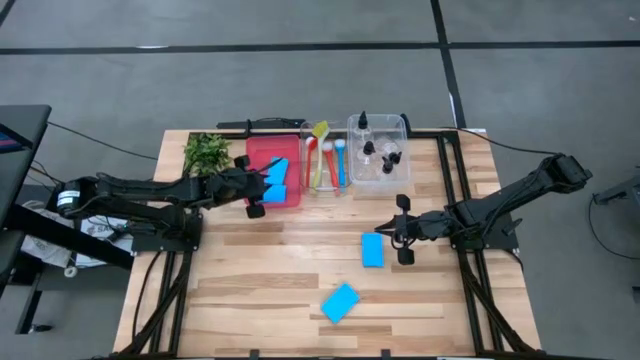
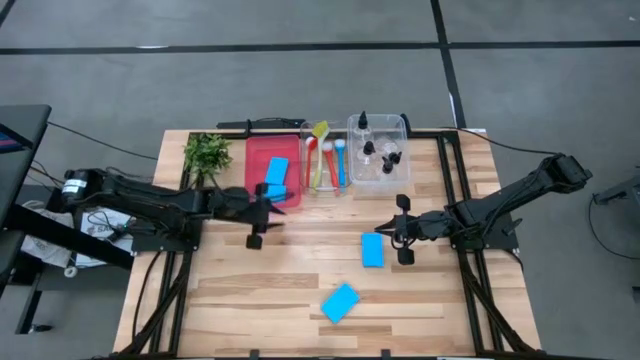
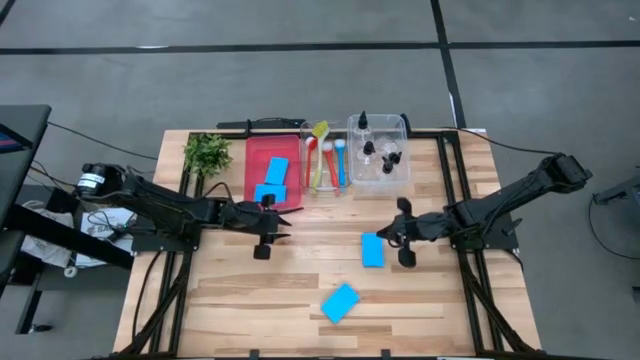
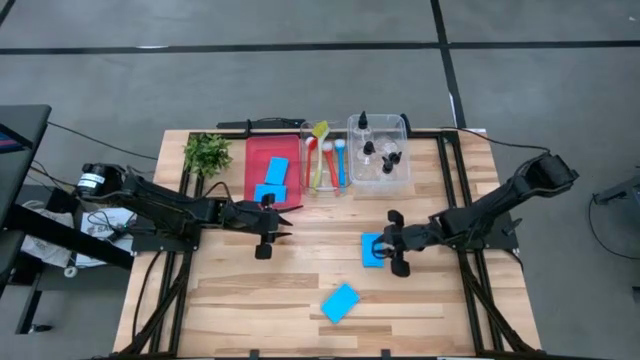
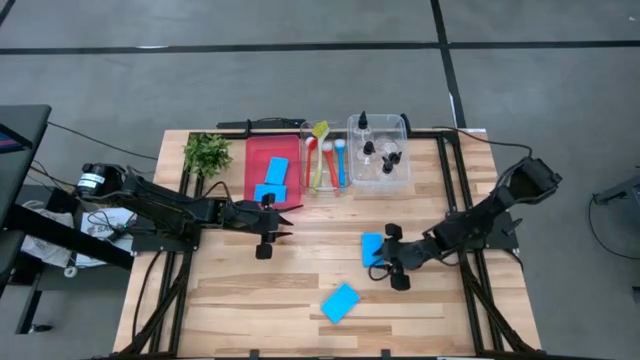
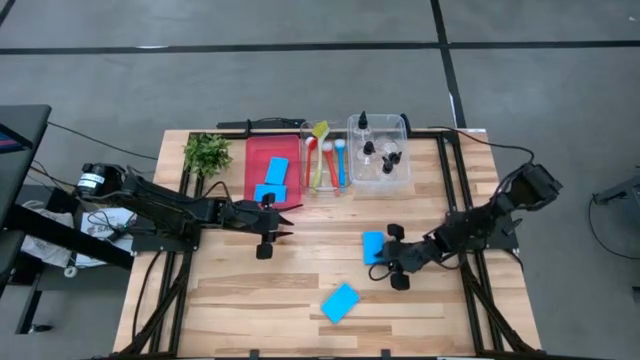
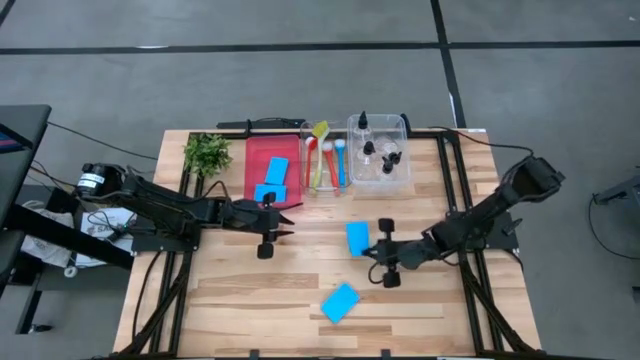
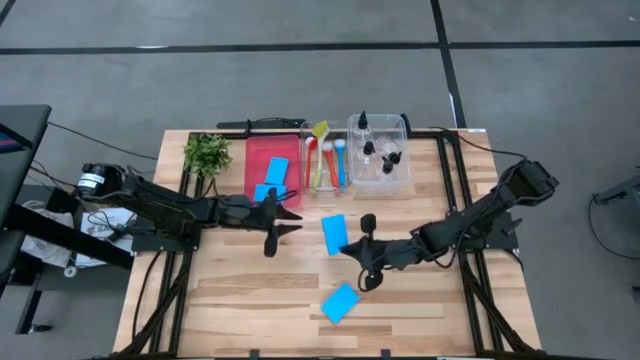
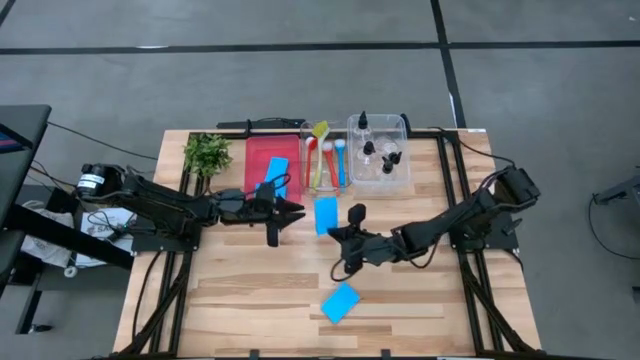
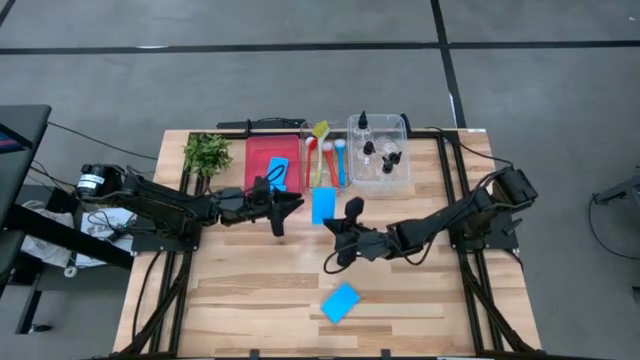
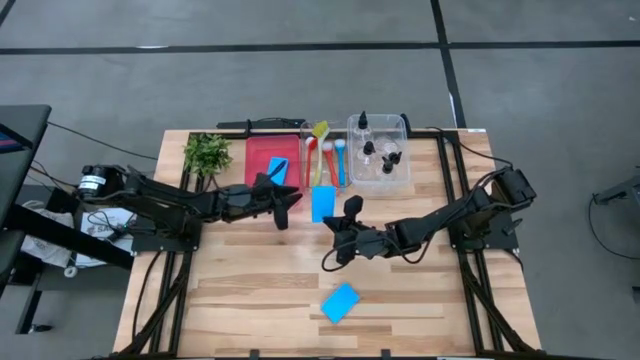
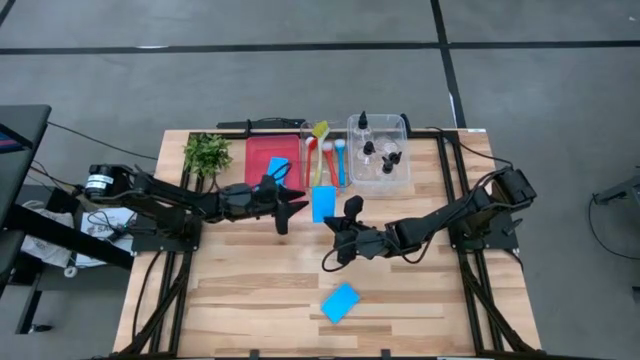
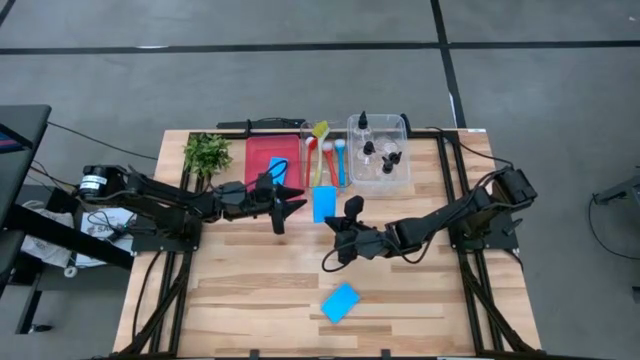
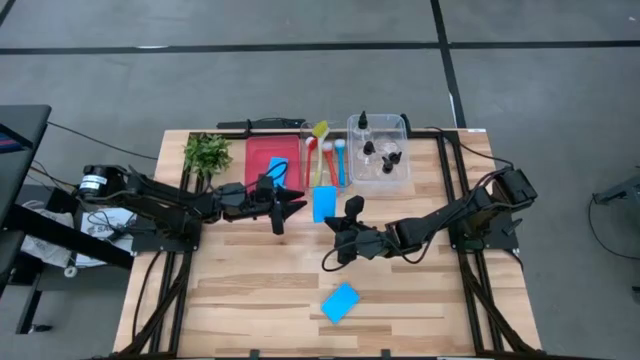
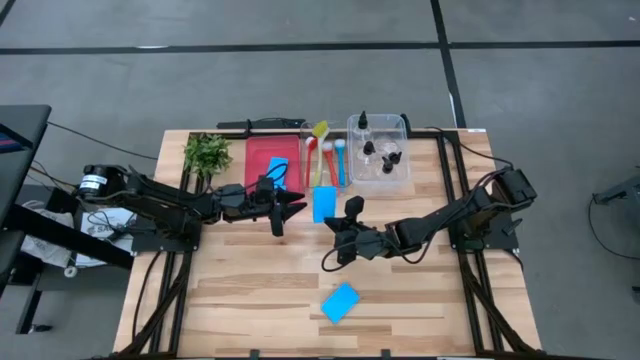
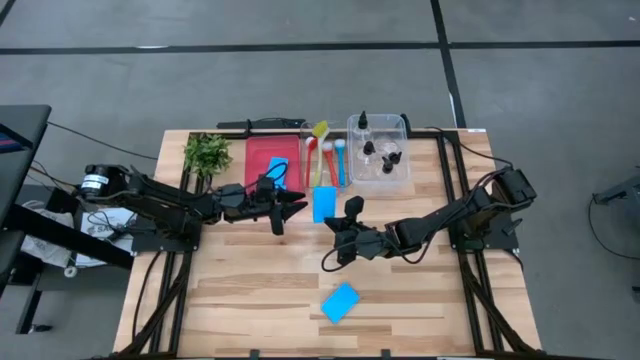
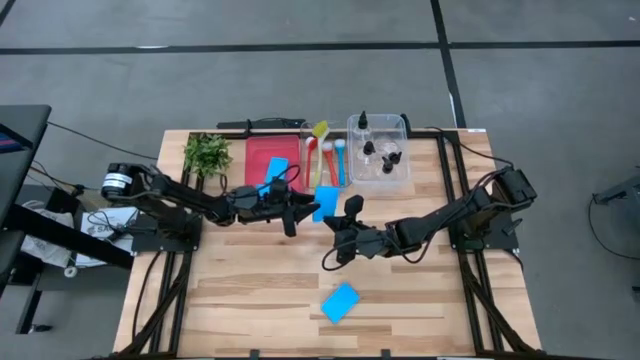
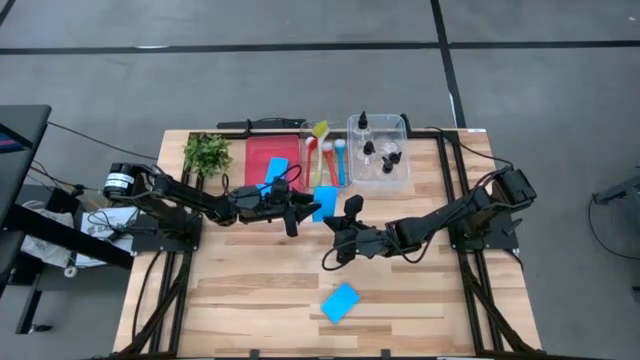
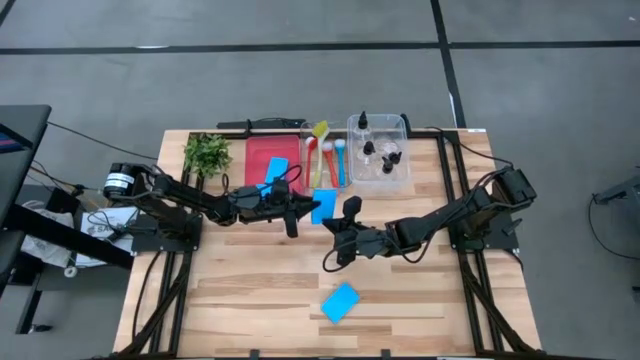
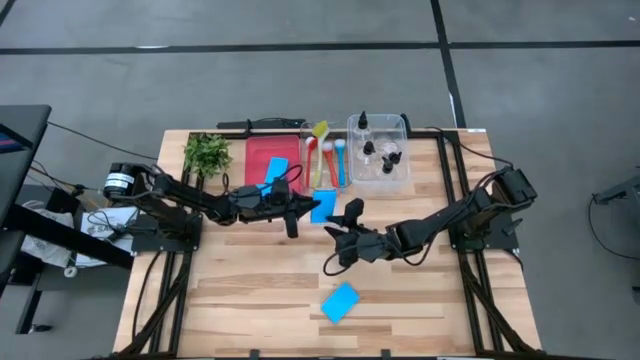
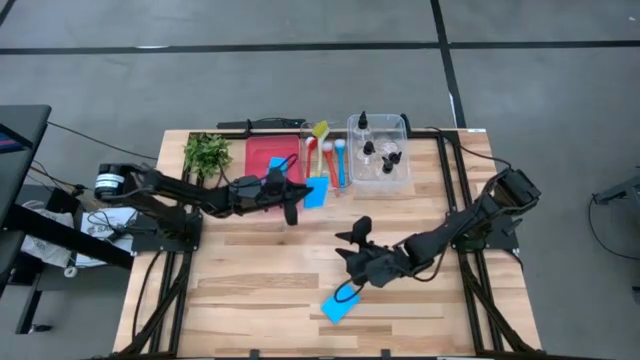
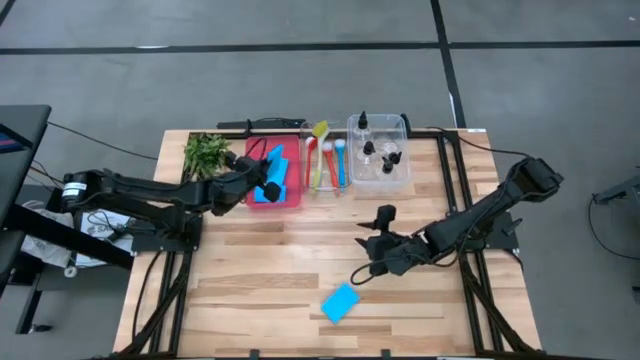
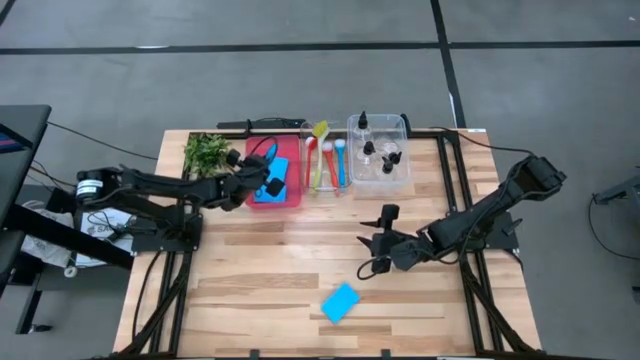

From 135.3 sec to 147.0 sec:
Task: Pick & Place Kitchen Sink Supplies
Put the top blue sponge into the red bin

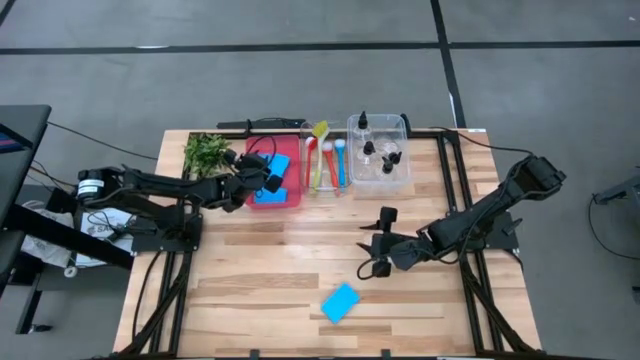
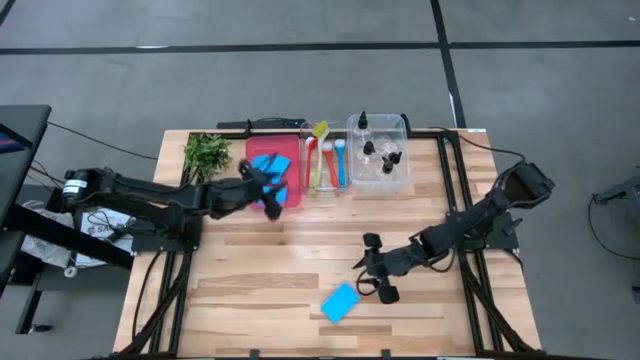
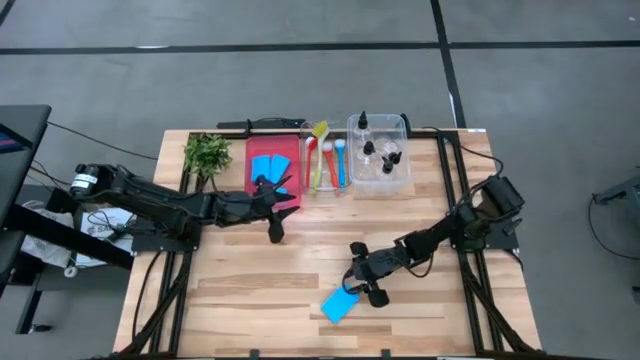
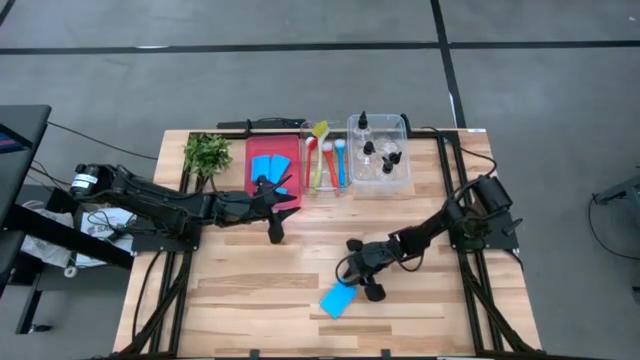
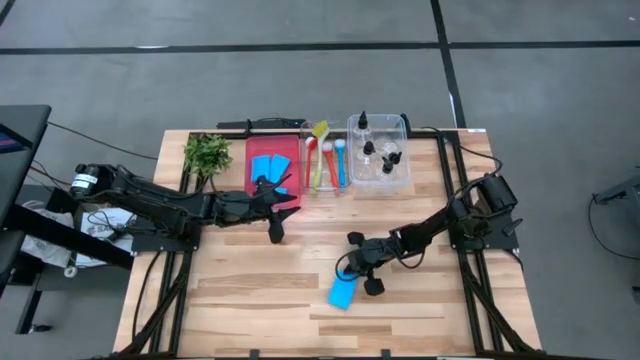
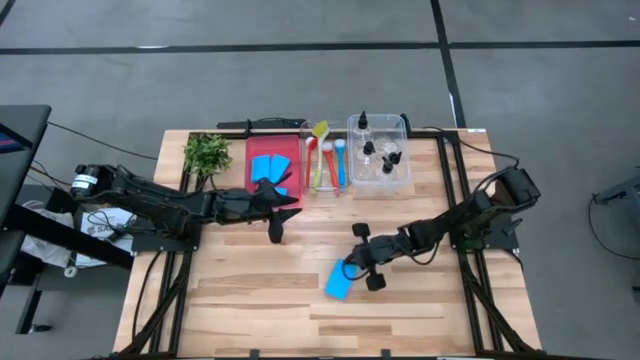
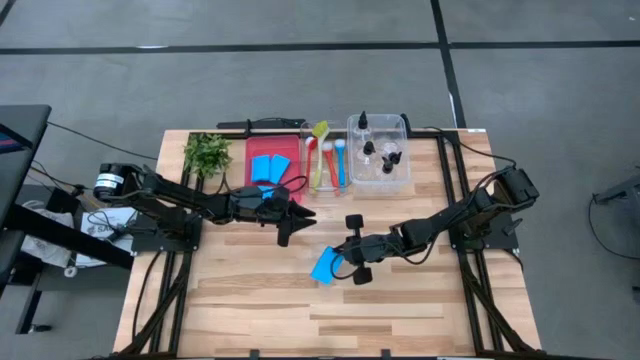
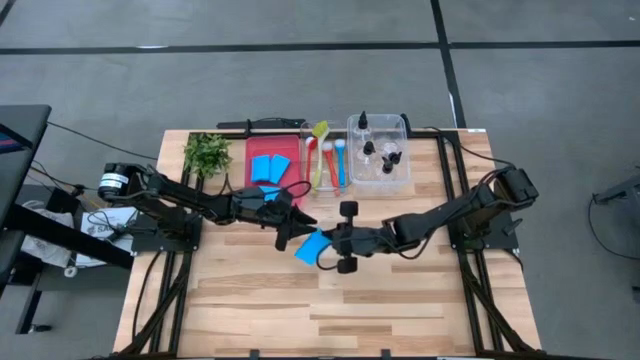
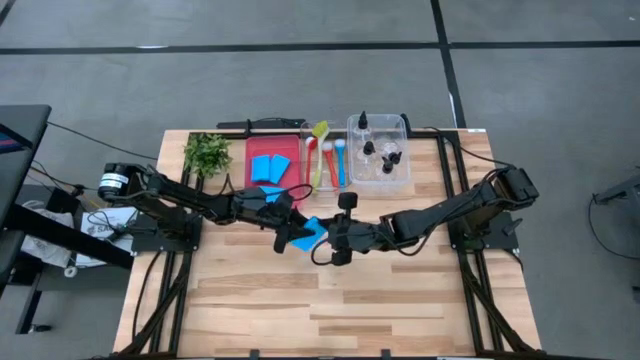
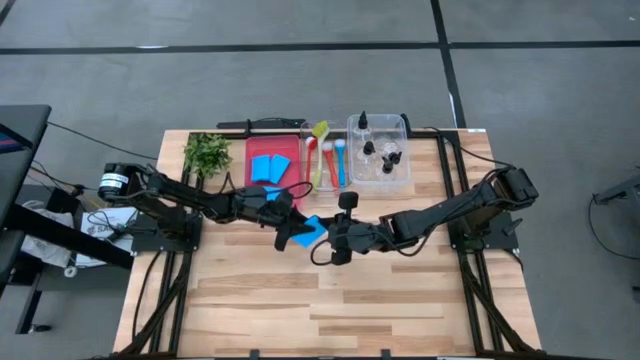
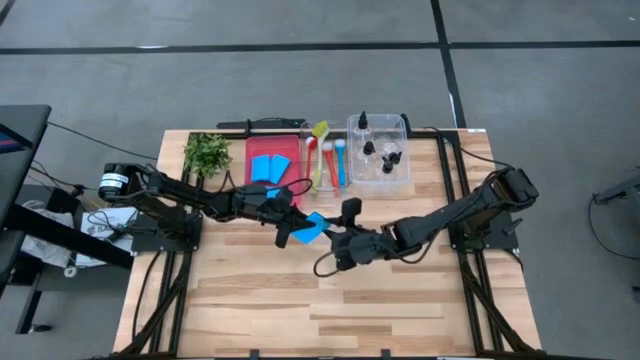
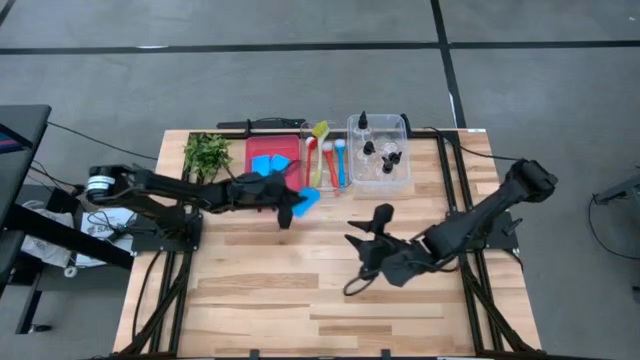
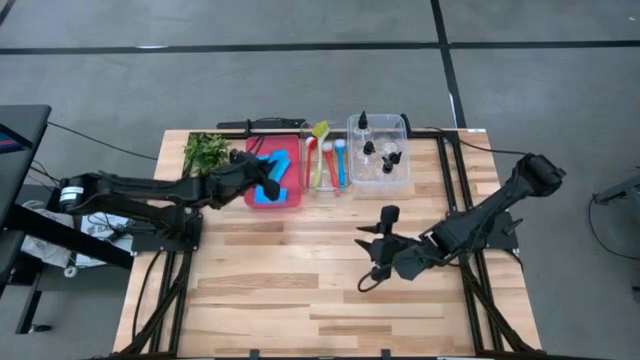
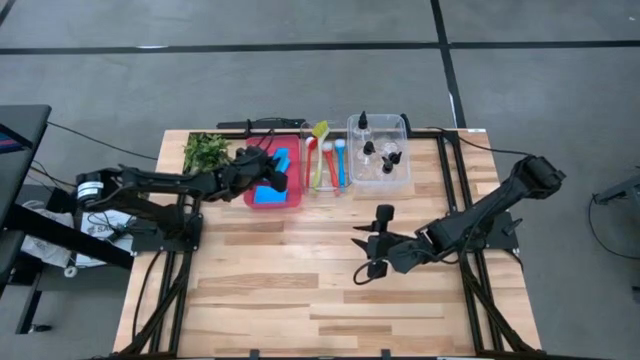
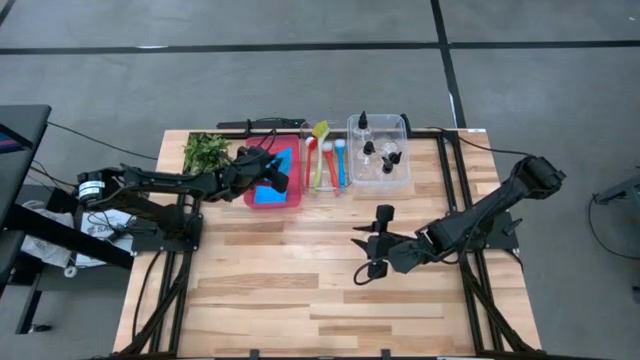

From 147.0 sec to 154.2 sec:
Put the blue sponge into the red bin

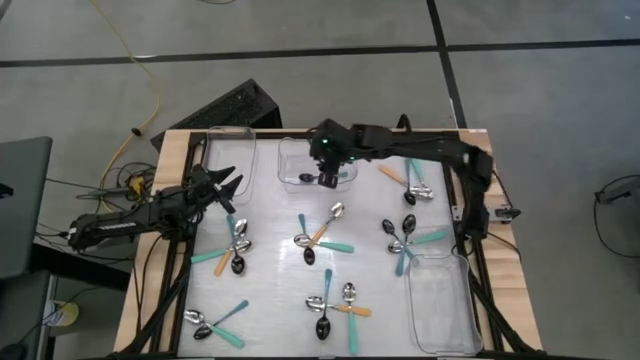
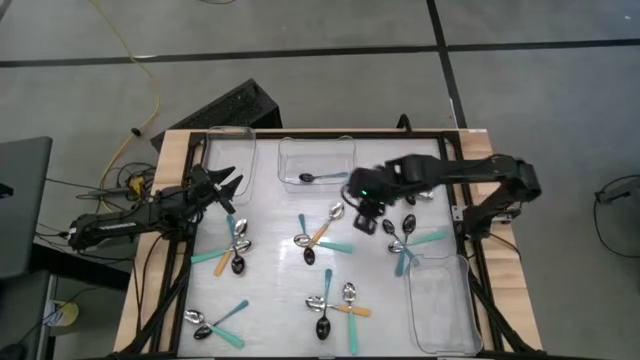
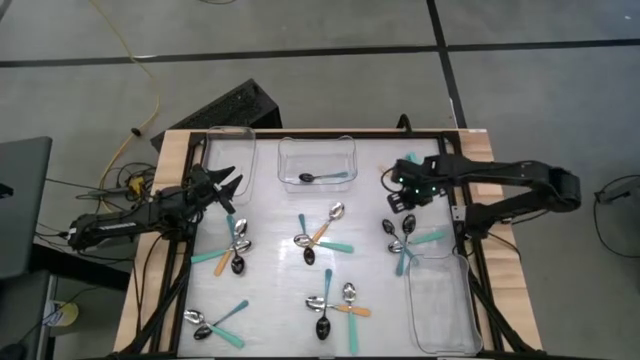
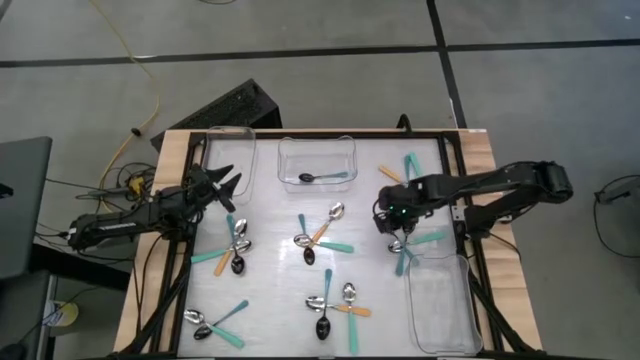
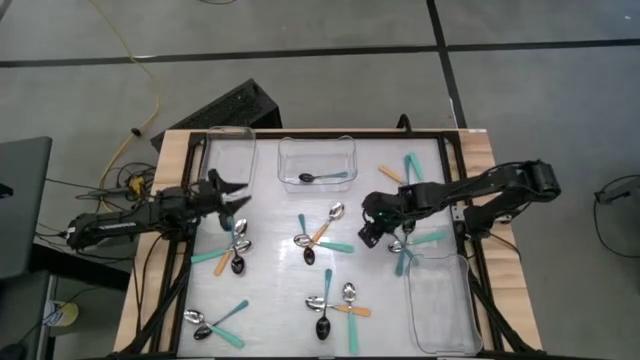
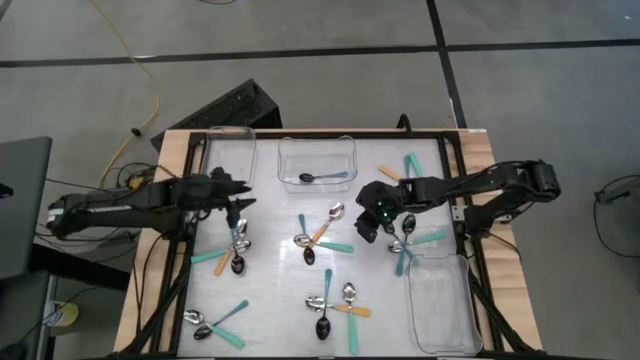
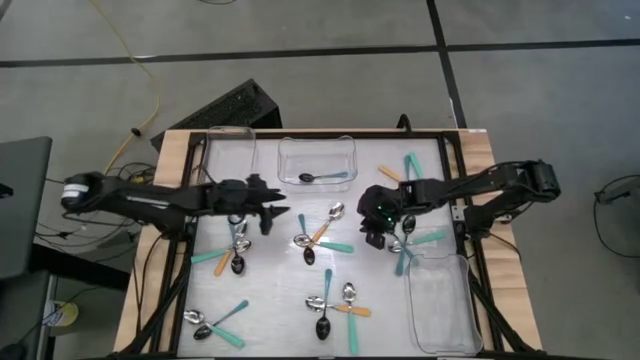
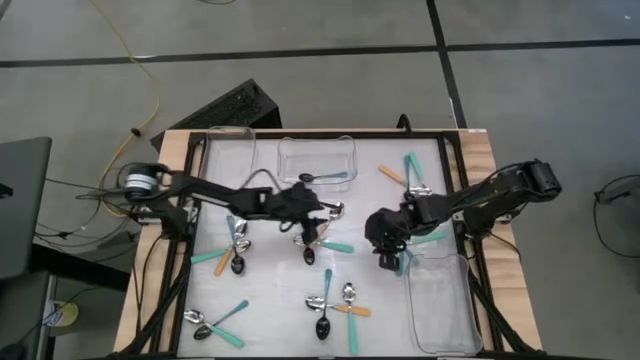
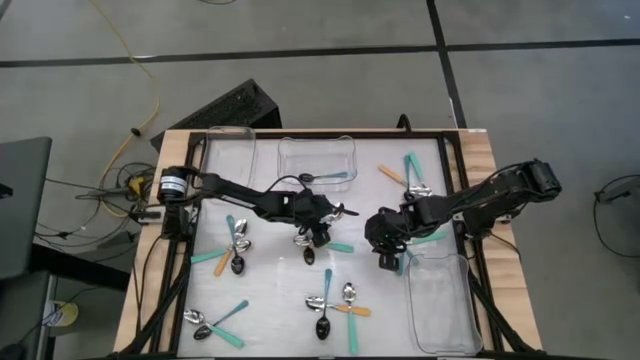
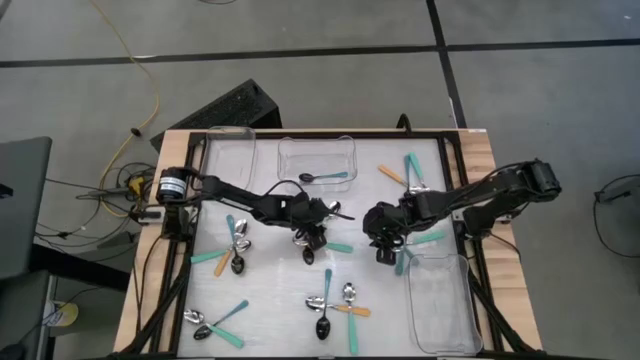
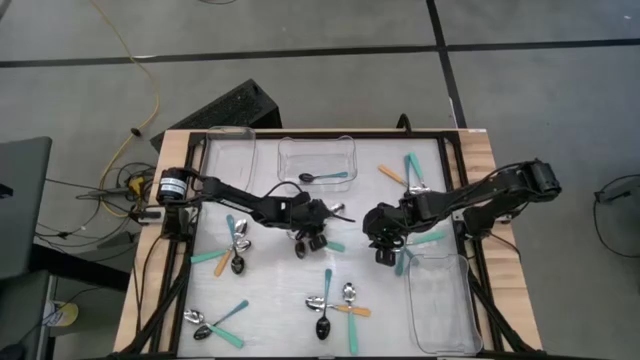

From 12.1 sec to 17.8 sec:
Task: Sort silverware by color (type)
Put the yellow spoon into the top left transparent bin
